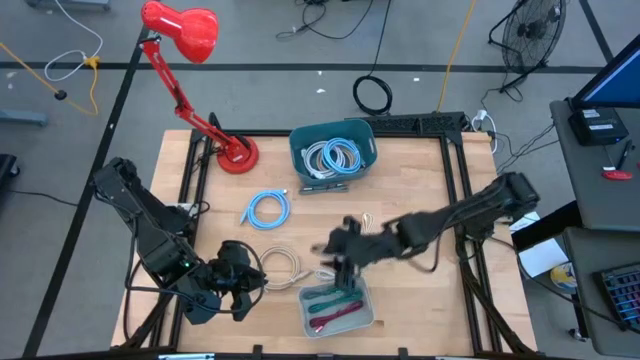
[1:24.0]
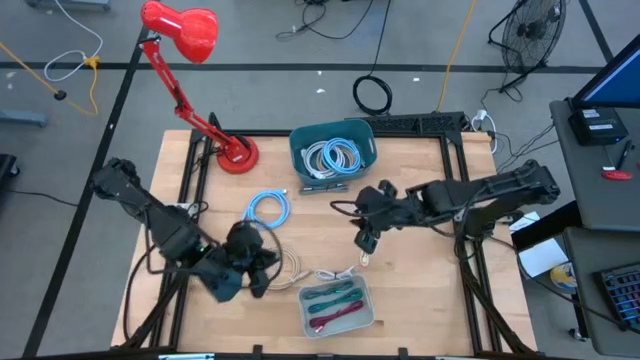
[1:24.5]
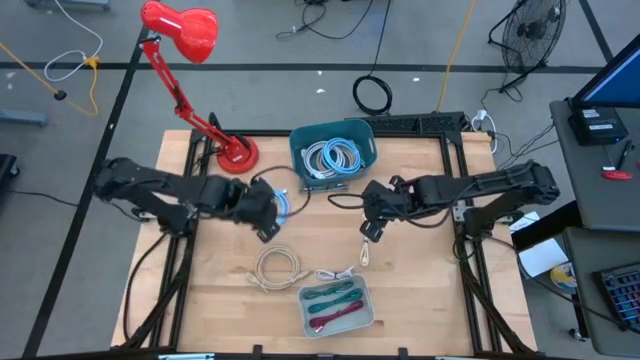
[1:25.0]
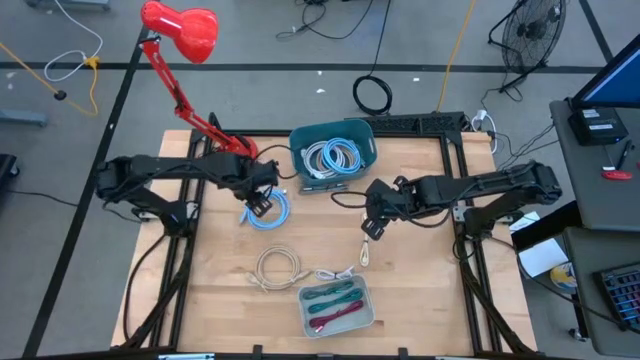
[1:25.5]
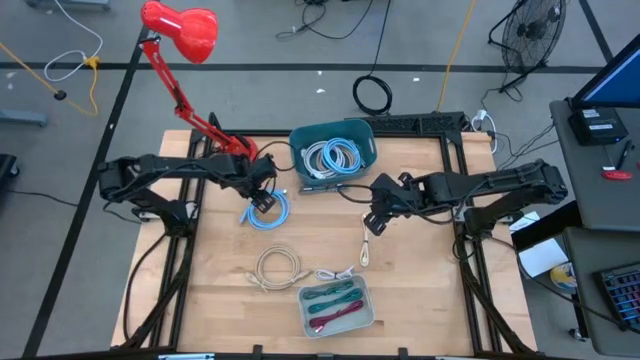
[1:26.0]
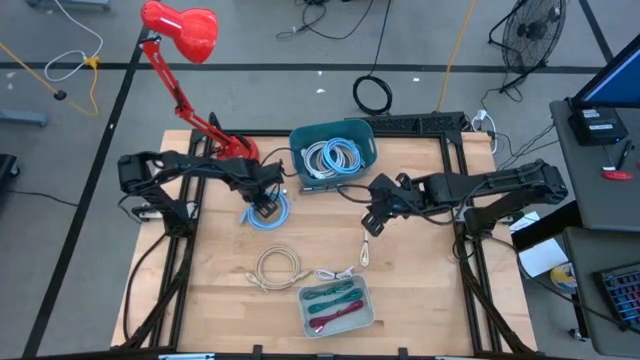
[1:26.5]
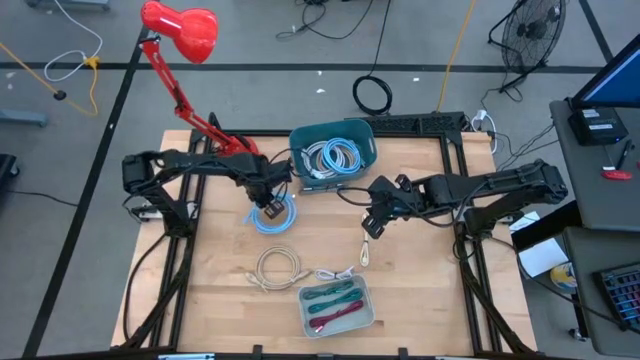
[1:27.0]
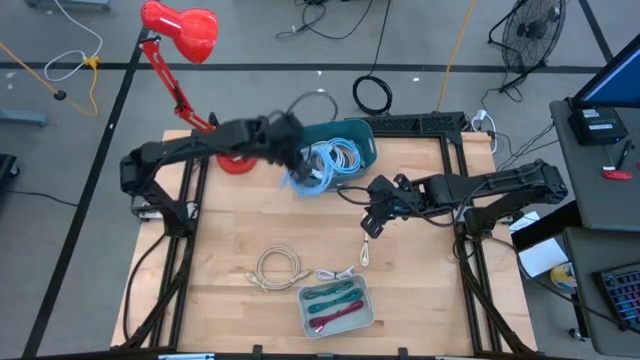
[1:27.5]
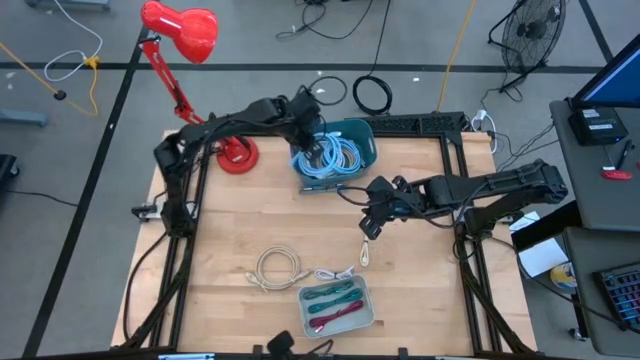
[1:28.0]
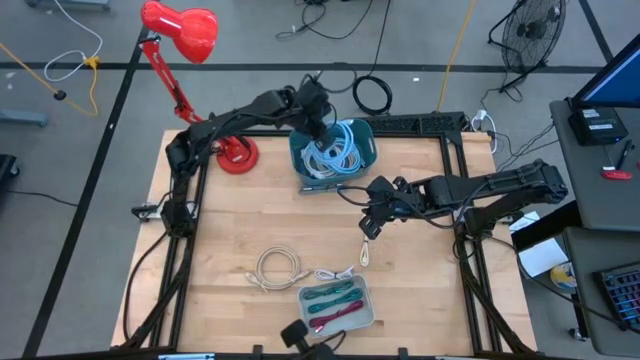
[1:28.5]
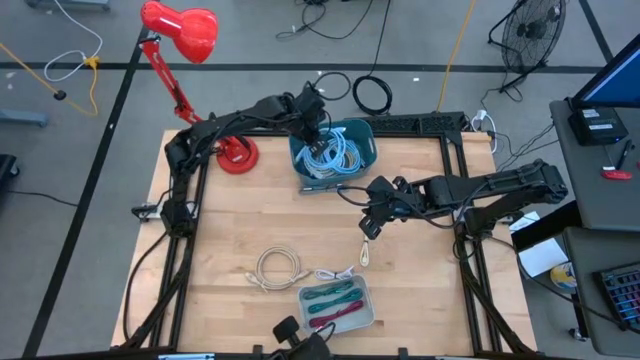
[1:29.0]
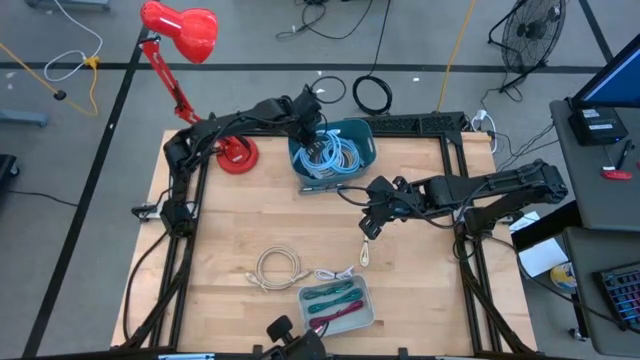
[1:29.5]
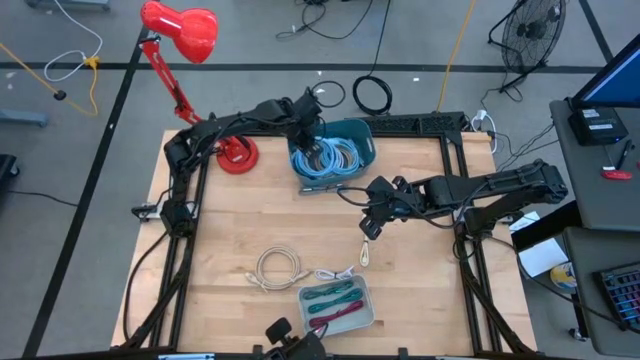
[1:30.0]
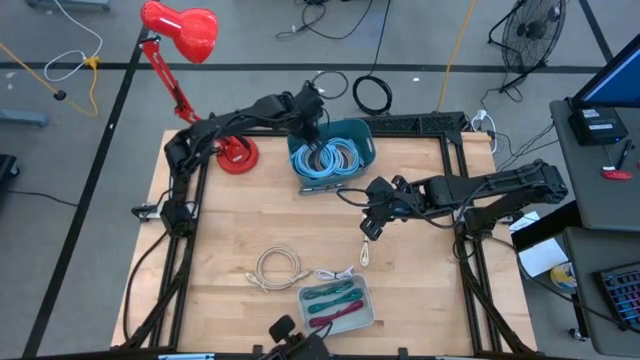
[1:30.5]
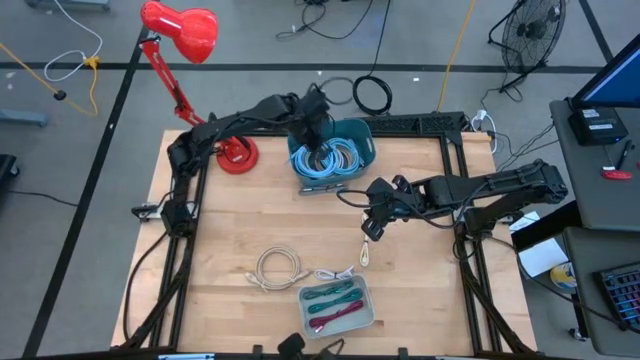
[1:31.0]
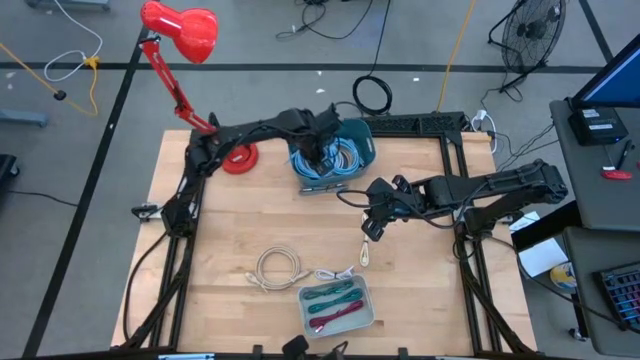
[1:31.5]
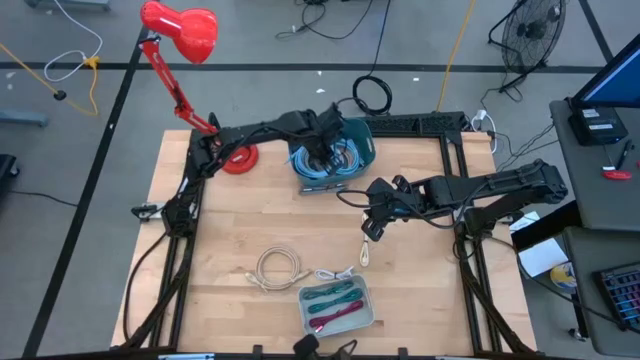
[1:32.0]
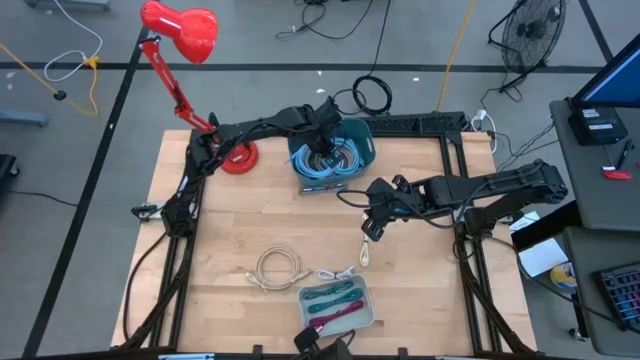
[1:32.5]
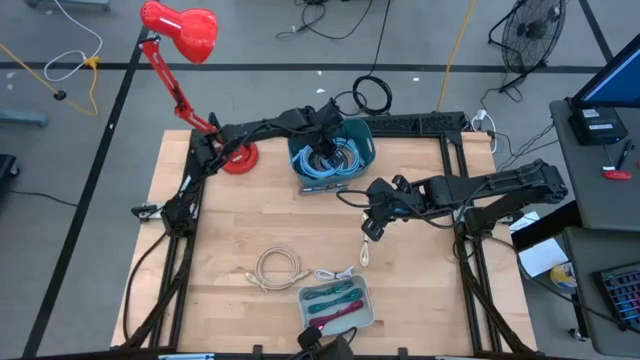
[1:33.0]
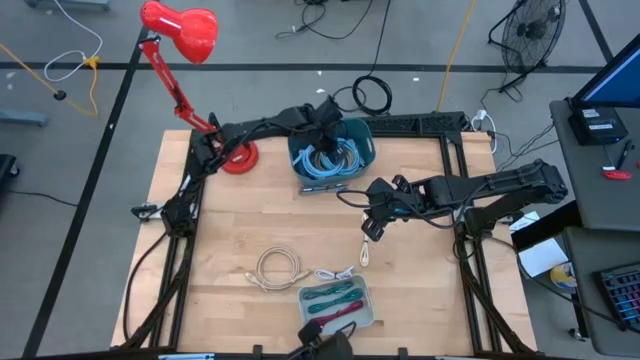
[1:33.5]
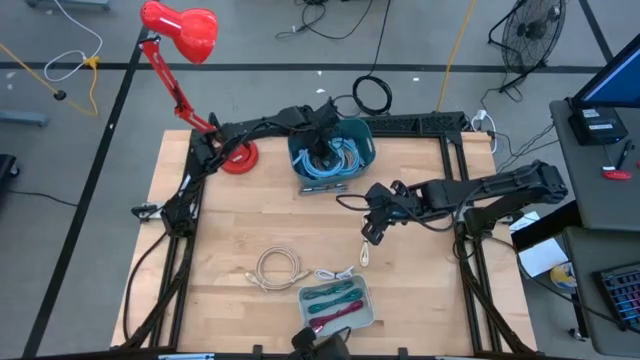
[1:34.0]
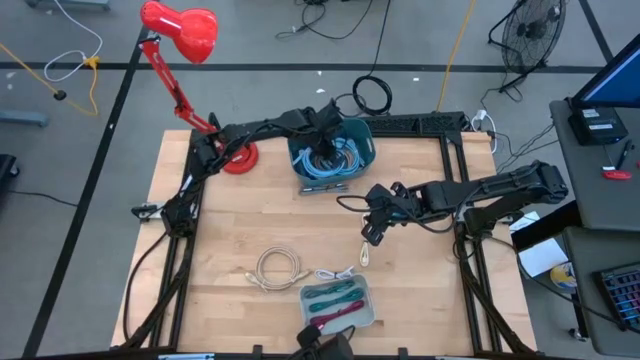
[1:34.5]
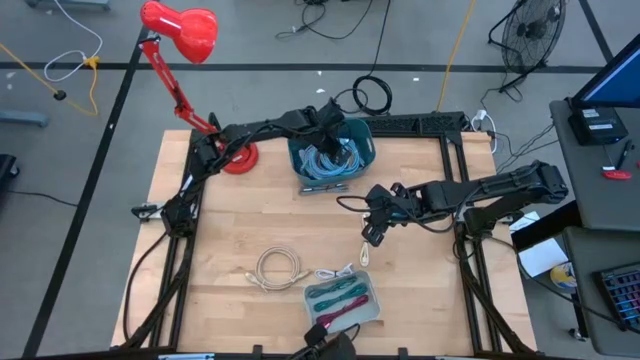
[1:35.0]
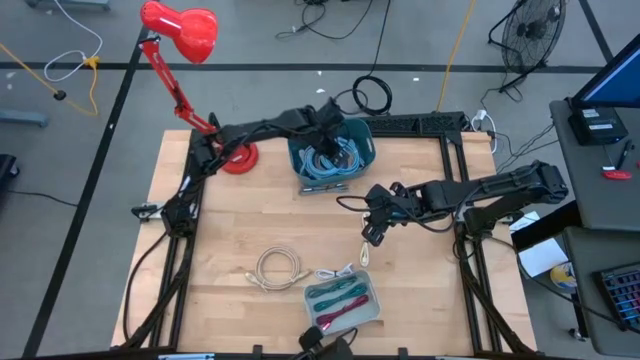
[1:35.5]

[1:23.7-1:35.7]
Task: Pick & Place USB Port
Put the blue hdmi cable into the green bin

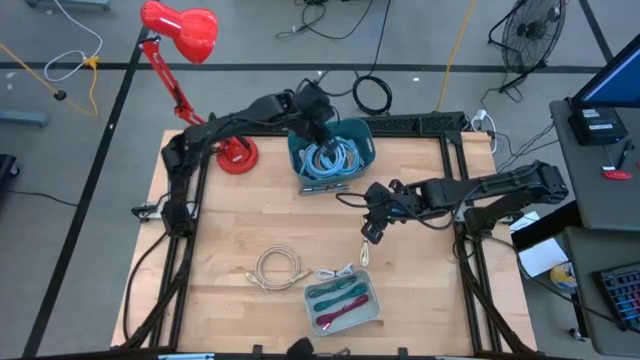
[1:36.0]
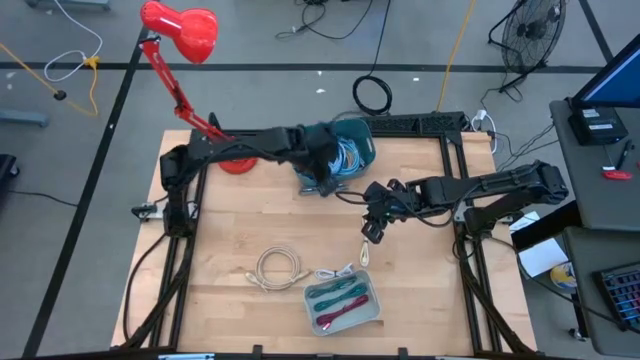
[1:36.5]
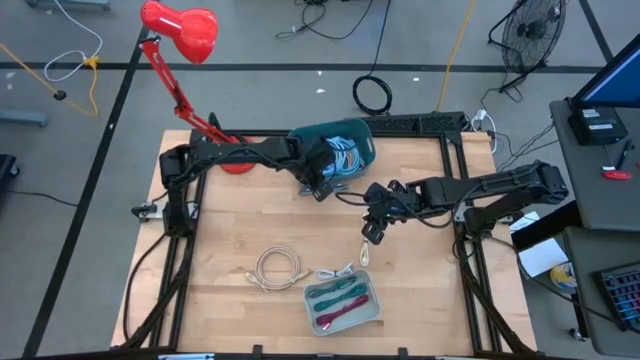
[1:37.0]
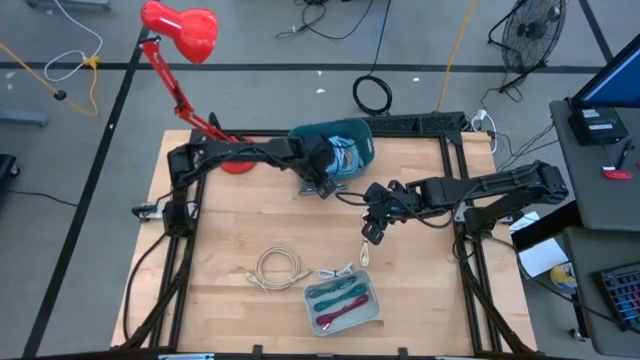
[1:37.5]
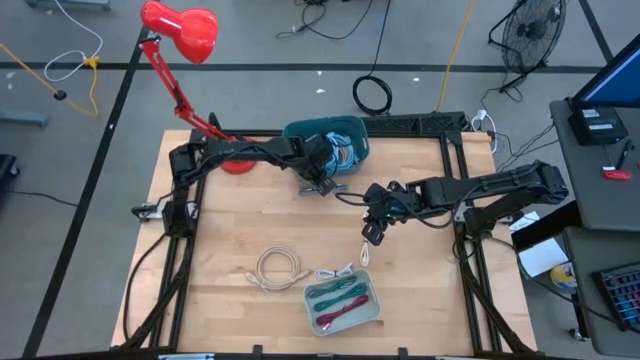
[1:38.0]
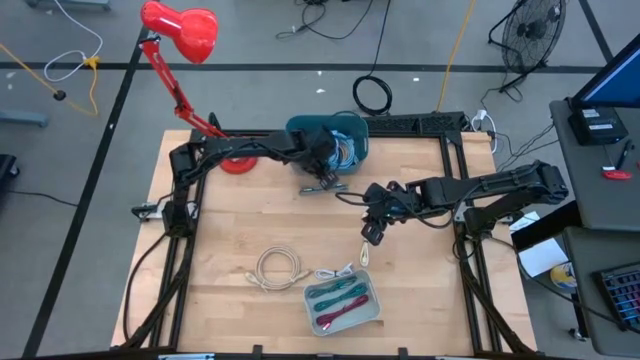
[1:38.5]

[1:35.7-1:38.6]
Adjust the green bin

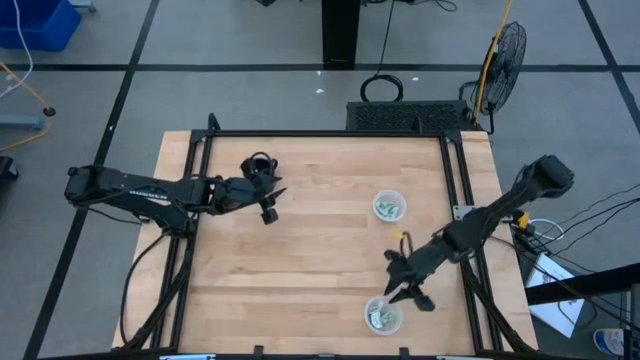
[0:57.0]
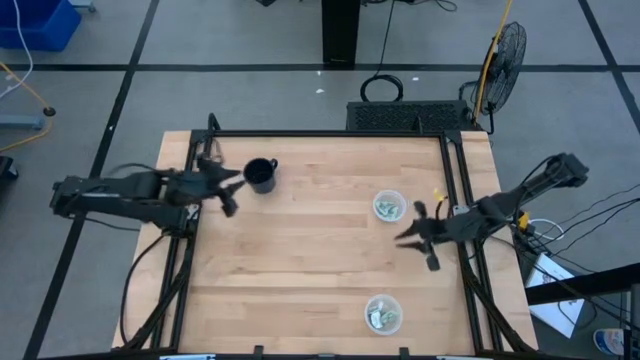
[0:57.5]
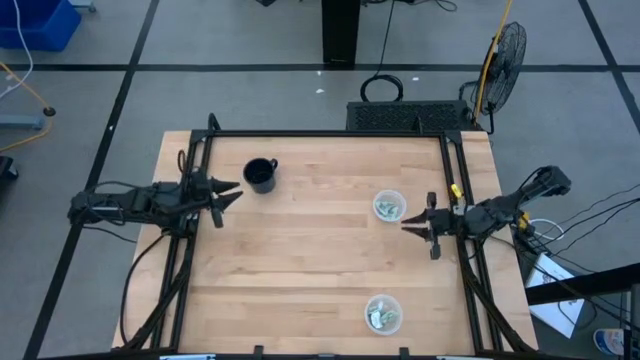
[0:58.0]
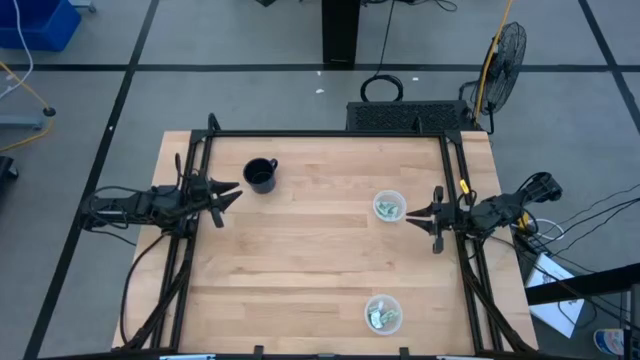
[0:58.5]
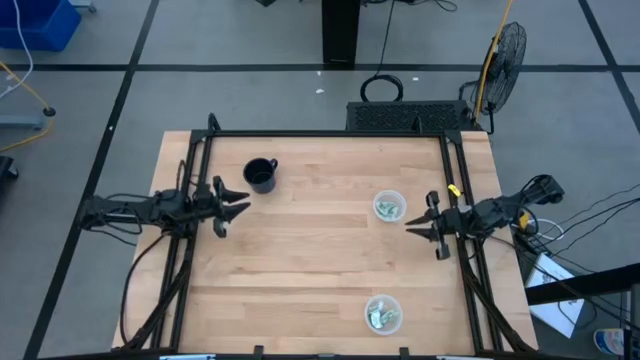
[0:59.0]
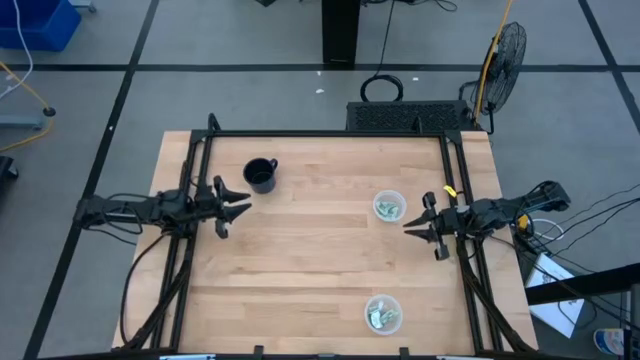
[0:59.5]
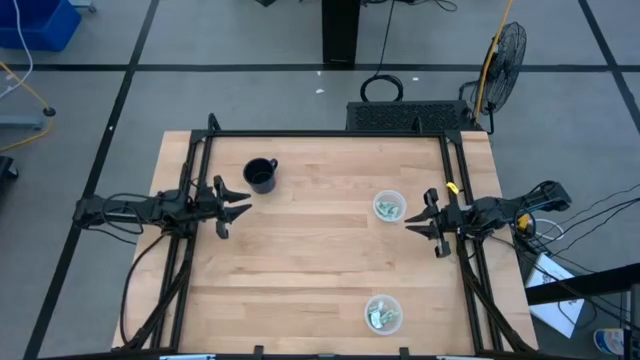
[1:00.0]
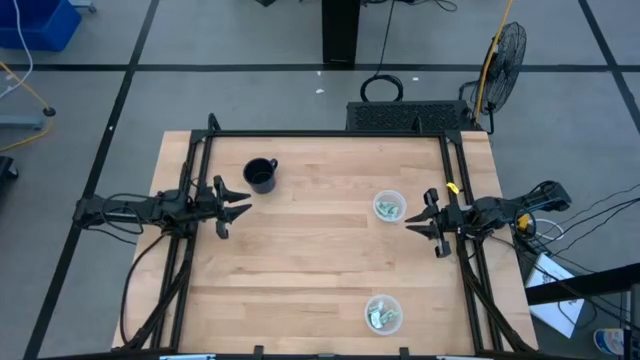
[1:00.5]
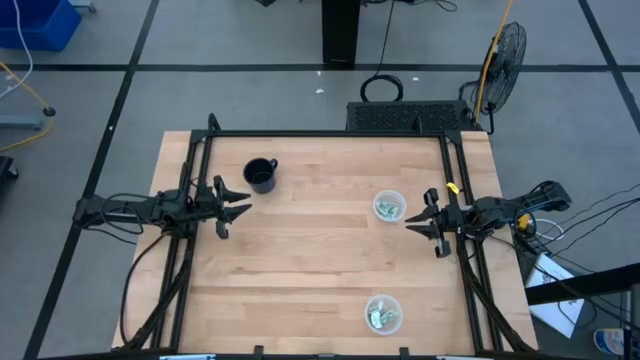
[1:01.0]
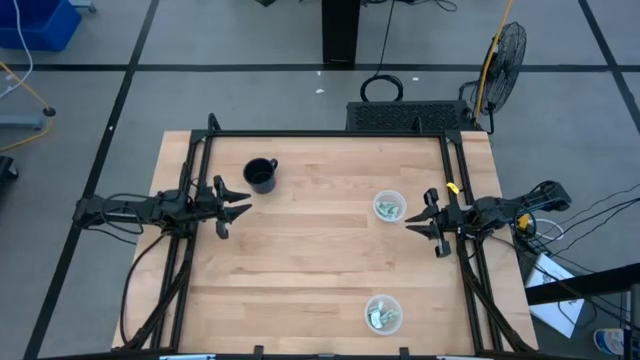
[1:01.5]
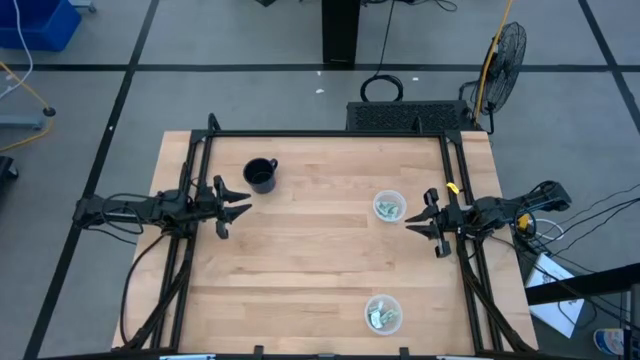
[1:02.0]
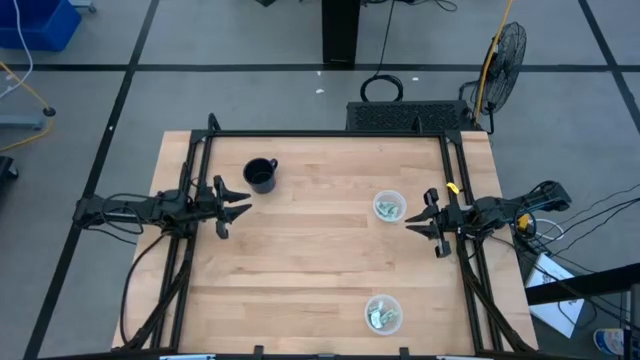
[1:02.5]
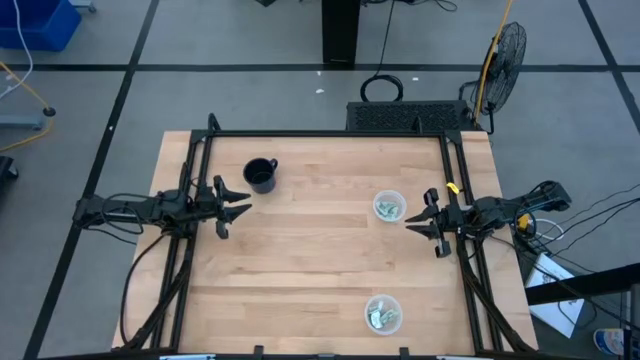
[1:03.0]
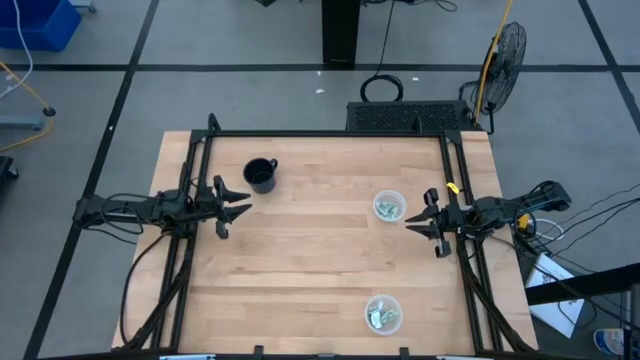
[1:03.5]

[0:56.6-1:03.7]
Task: Pick and place Stevia / Truvia into bins
Return to Home Position
